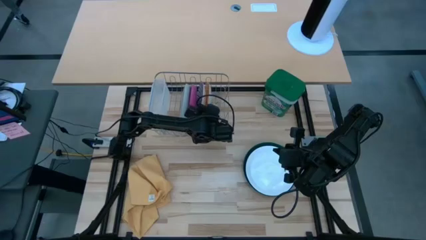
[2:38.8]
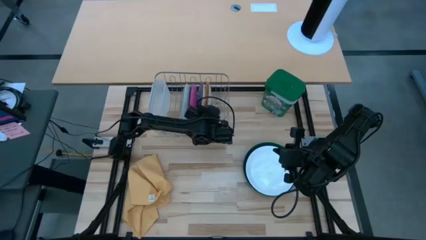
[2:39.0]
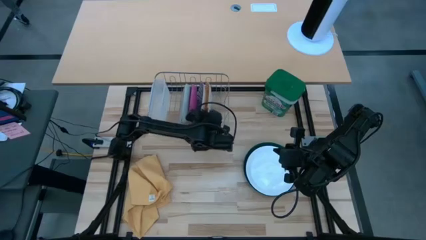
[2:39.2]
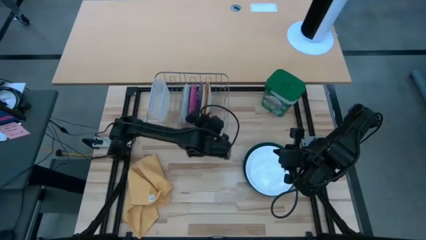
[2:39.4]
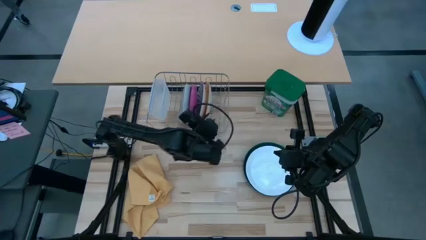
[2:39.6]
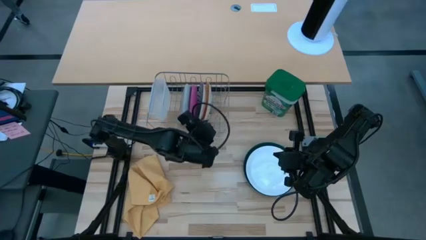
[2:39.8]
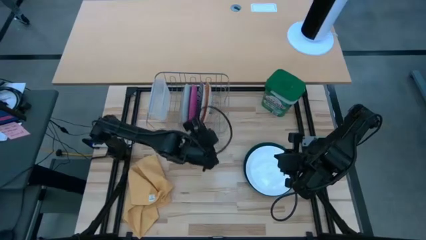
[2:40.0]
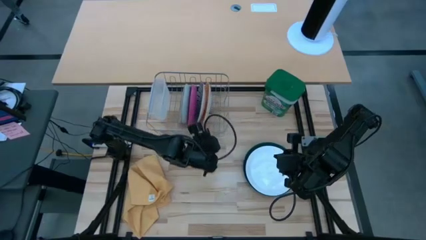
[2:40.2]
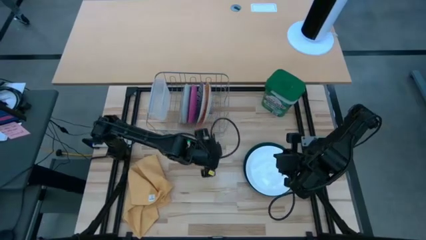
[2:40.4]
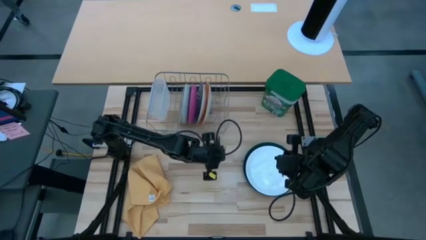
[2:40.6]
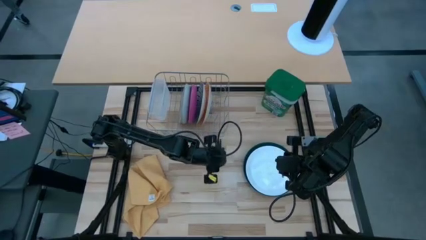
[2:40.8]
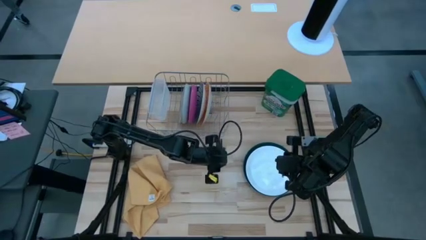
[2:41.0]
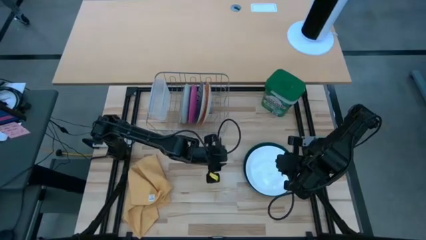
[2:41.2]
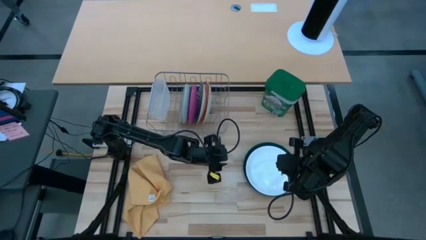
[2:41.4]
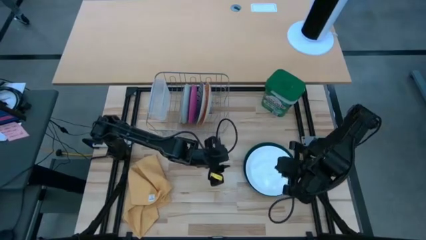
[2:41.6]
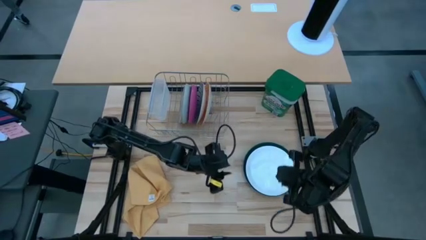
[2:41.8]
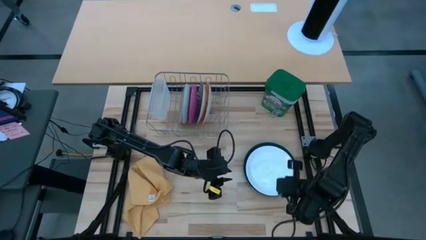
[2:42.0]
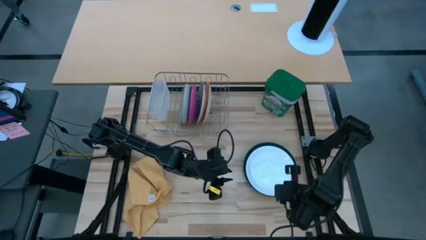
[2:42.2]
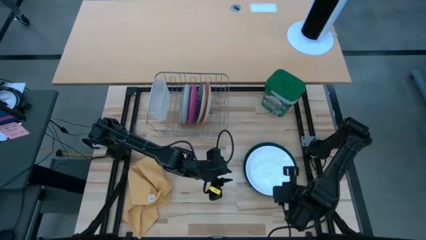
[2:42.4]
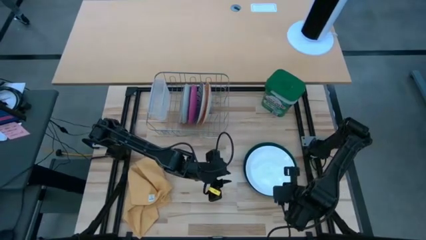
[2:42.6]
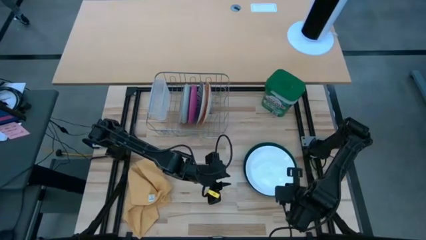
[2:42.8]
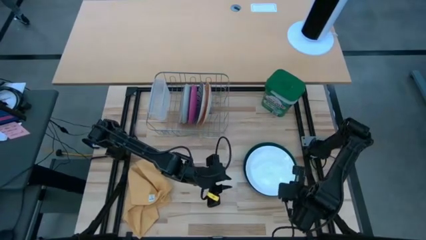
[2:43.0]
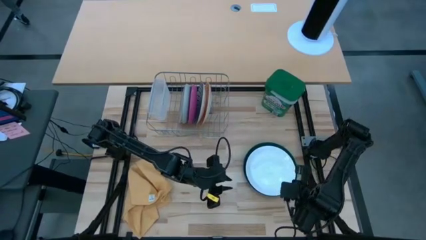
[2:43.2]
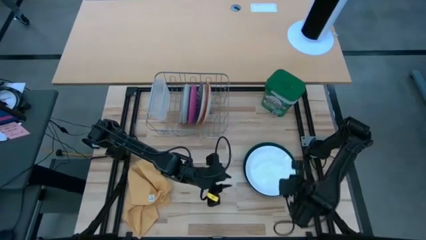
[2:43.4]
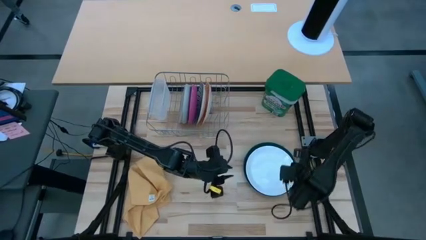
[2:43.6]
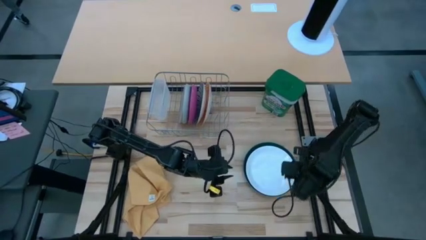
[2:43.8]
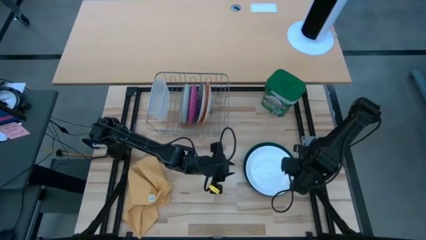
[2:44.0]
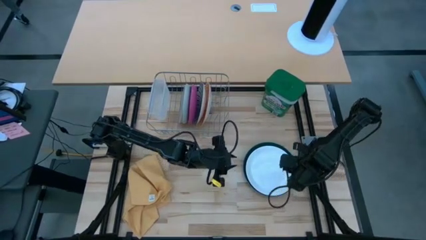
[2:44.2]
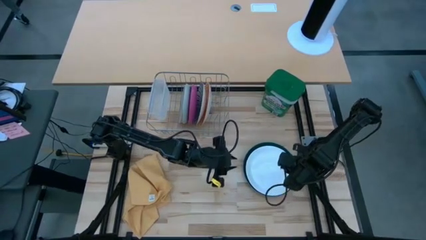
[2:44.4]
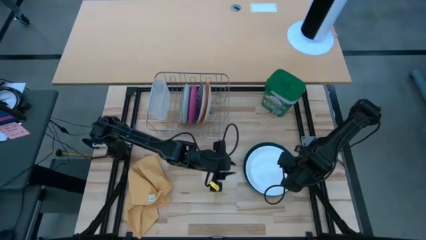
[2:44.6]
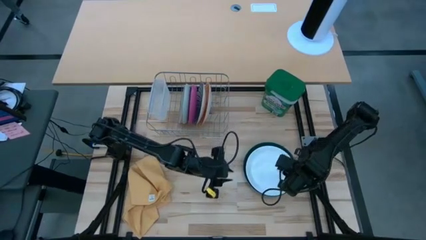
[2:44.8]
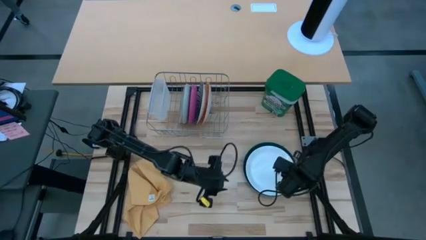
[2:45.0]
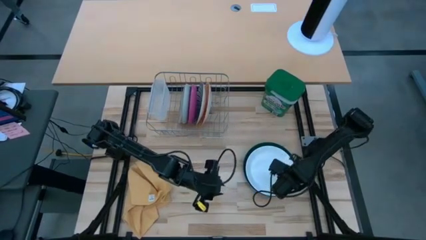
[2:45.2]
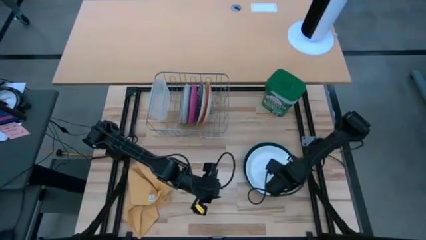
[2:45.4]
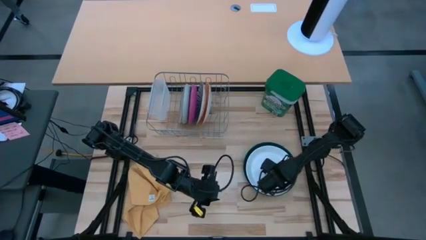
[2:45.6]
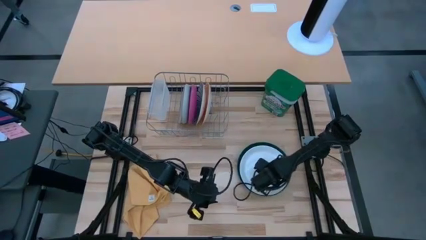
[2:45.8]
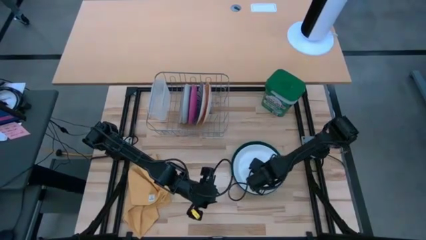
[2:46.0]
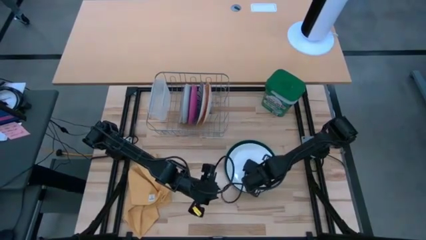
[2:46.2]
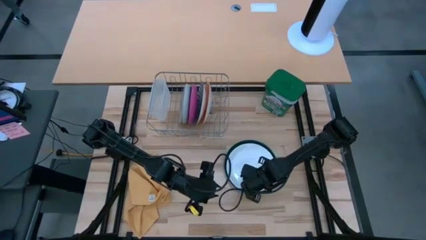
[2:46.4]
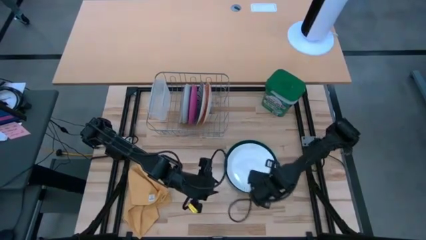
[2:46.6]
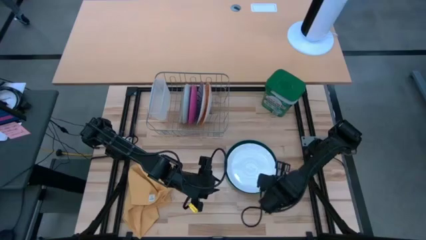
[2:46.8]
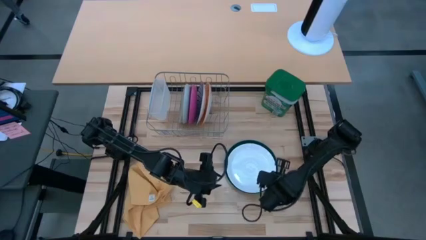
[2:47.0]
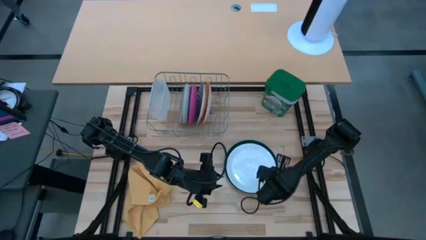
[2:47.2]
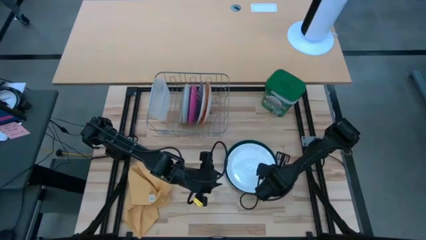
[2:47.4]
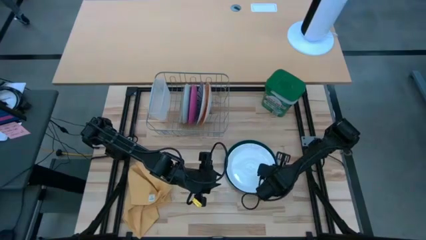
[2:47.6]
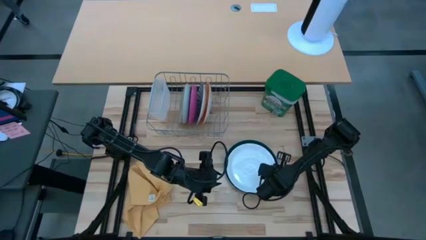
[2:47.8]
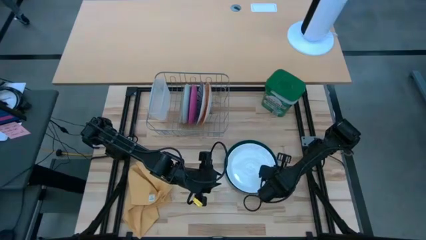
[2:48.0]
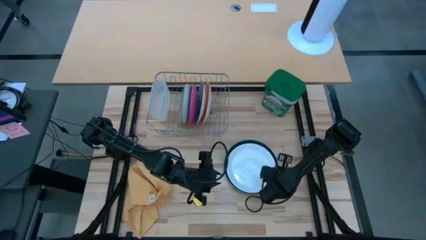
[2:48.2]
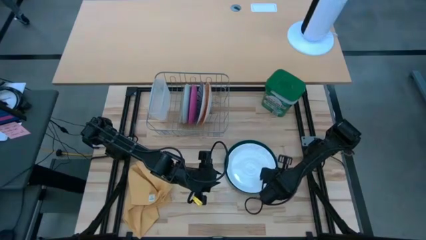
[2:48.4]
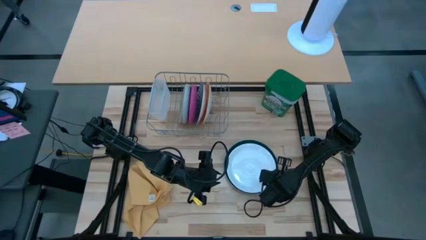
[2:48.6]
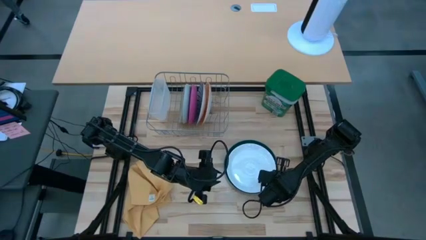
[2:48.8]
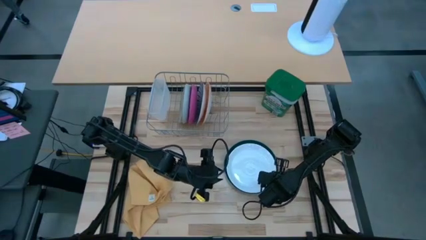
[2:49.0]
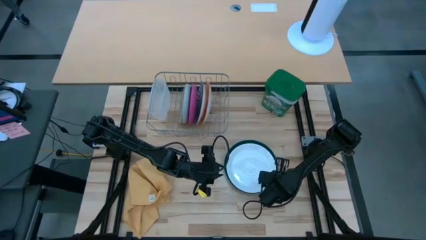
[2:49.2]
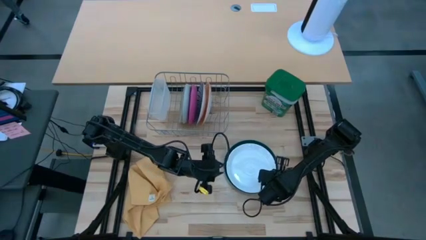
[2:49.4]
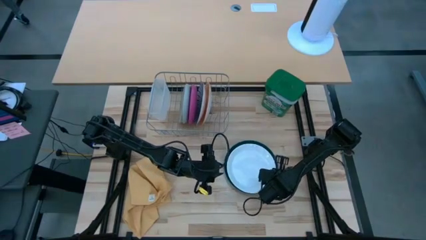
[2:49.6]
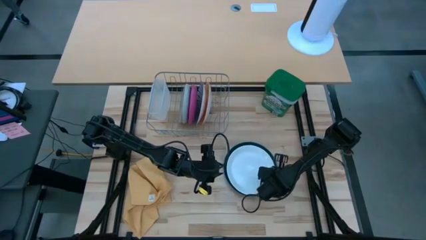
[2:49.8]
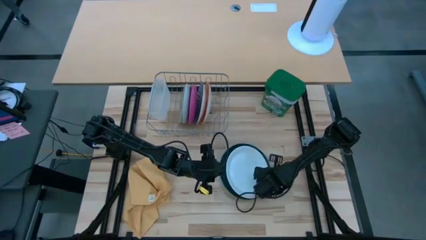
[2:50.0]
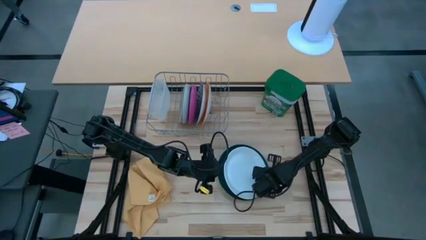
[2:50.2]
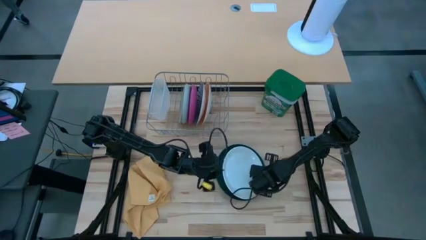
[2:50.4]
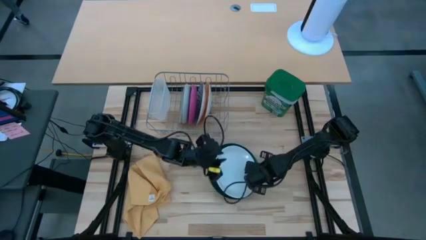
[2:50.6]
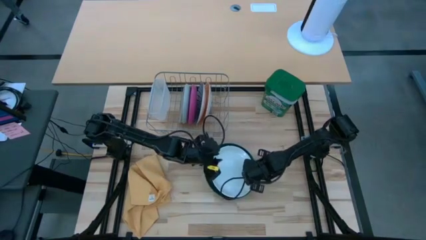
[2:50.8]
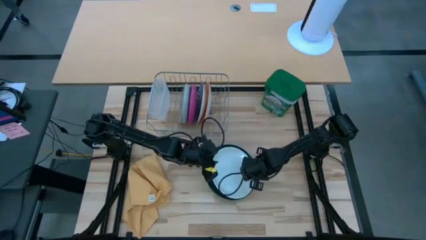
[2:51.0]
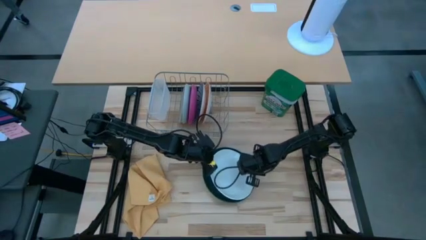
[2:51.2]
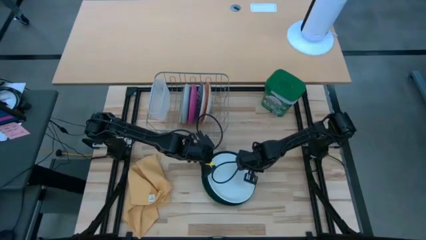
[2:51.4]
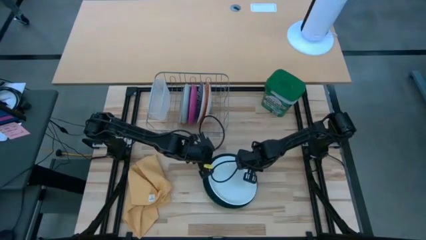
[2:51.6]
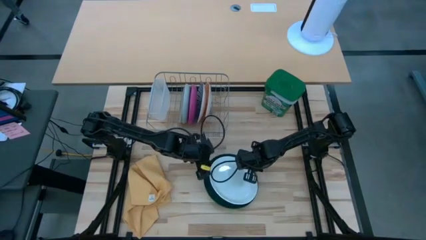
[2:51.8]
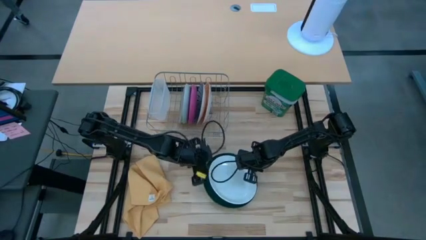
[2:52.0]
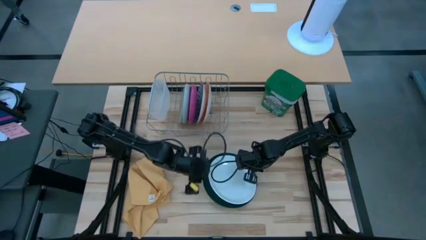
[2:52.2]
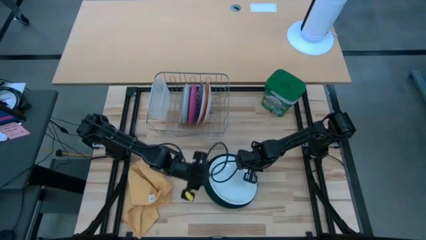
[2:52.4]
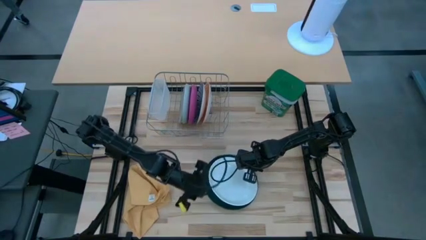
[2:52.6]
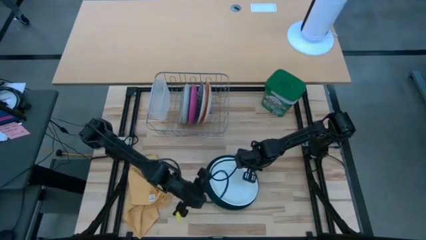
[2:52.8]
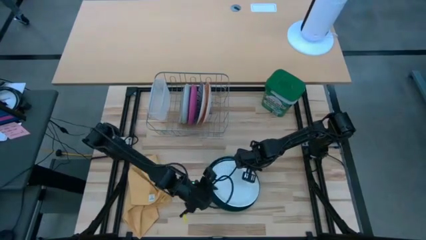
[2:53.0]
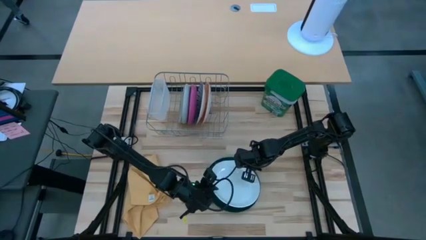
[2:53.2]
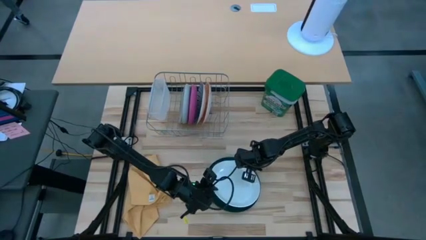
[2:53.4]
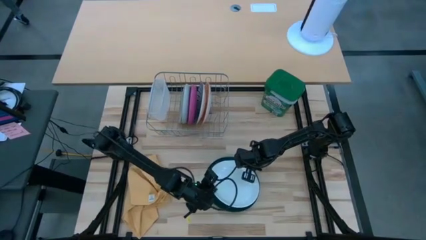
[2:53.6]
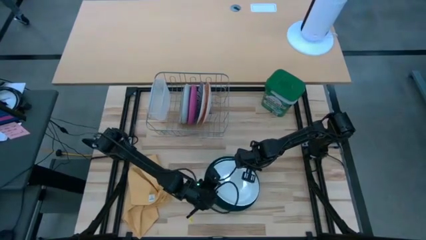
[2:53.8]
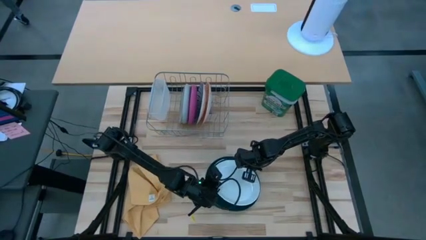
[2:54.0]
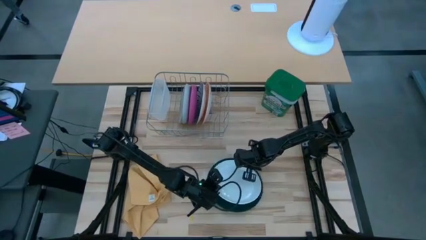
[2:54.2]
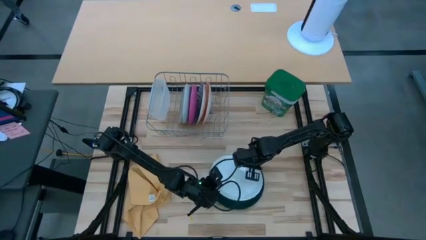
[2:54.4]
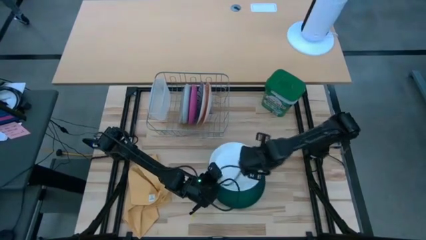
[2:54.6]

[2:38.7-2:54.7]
Task: Sort dishes
Put the white plate into the dish rack

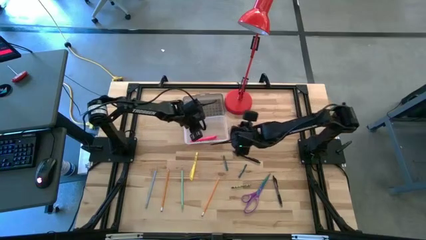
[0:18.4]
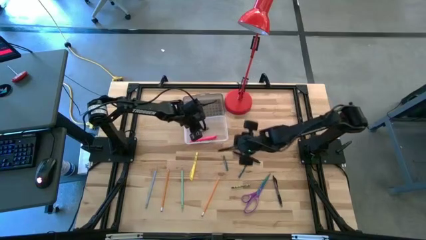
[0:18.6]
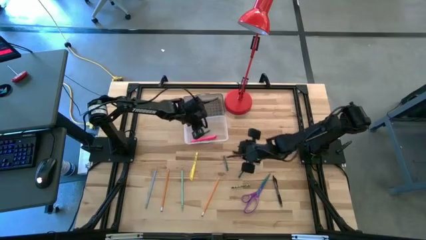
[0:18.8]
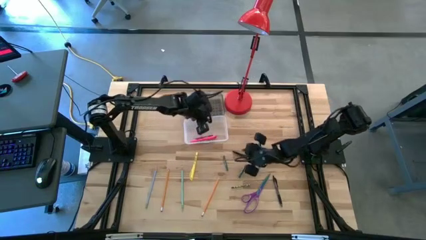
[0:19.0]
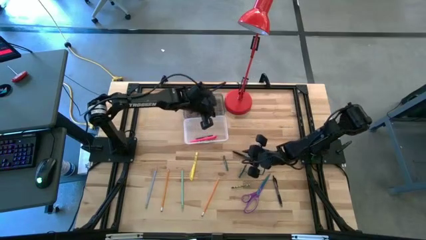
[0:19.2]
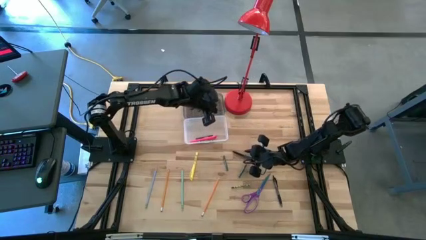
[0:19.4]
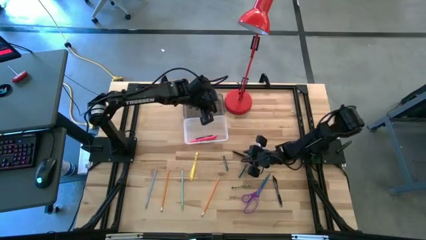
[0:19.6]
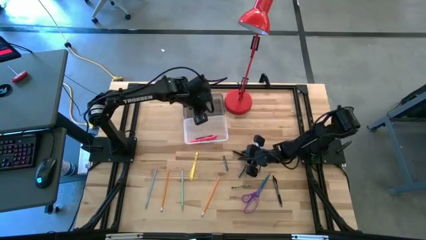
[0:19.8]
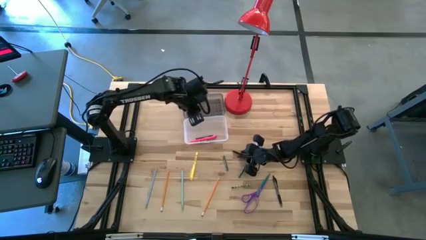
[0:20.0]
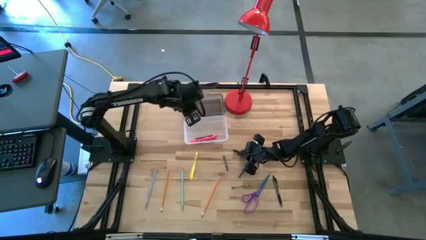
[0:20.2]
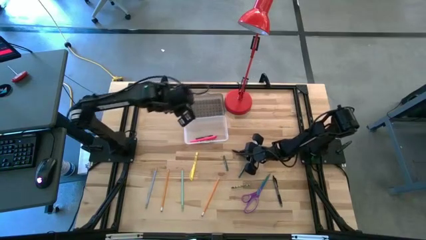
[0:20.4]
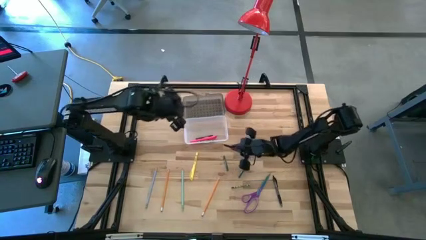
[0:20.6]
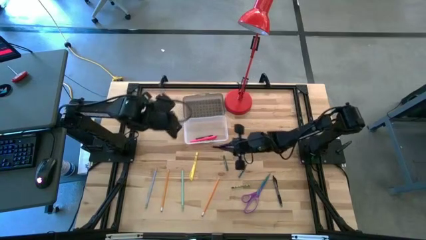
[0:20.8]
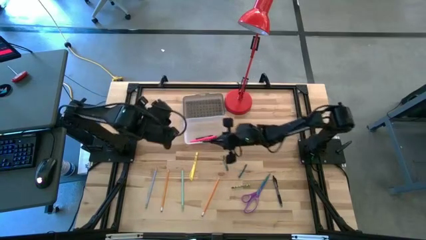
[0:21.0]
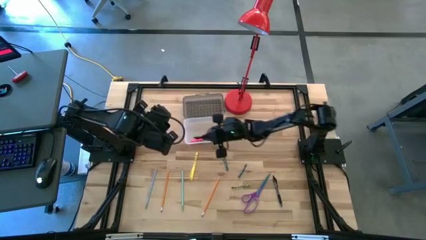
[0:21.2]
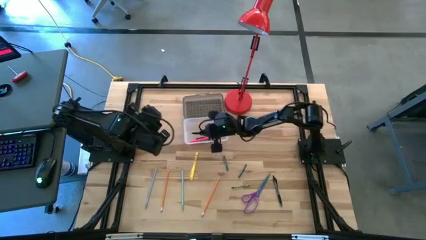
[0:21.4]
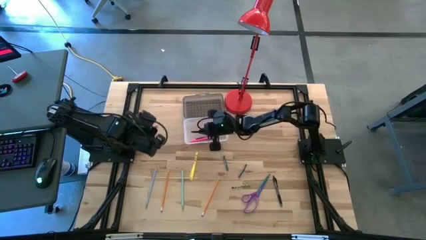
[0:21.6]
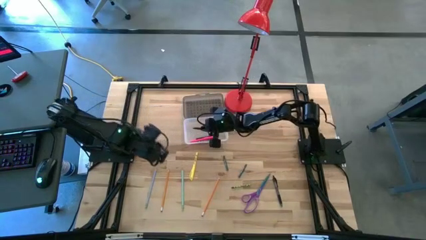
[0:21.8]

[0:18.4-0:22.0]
Task: Pick & place school supplies into a supply box
Put the black pen into the black supply box
